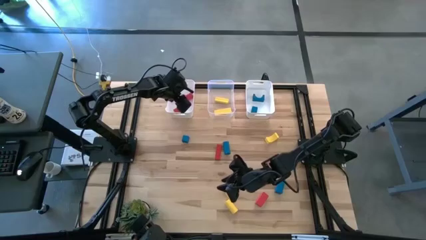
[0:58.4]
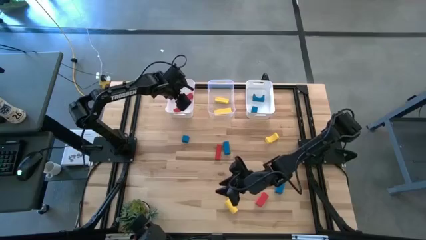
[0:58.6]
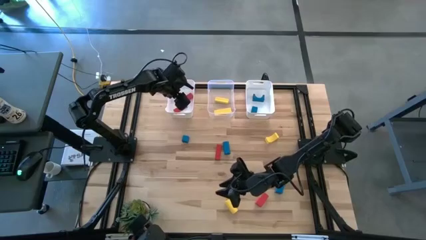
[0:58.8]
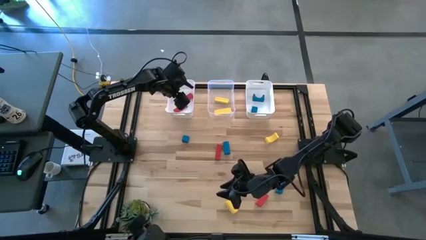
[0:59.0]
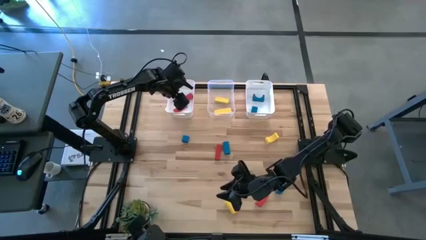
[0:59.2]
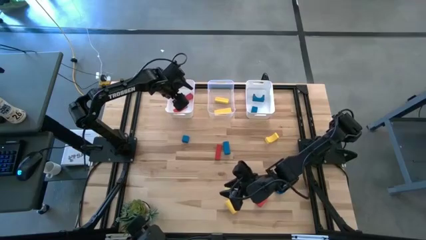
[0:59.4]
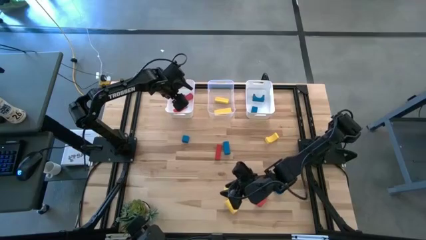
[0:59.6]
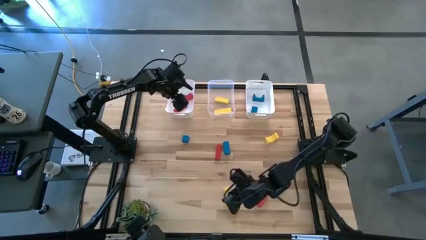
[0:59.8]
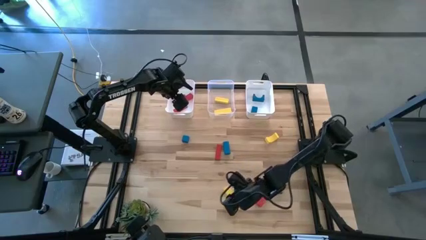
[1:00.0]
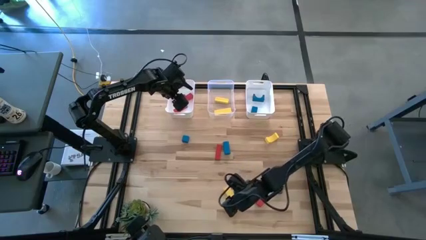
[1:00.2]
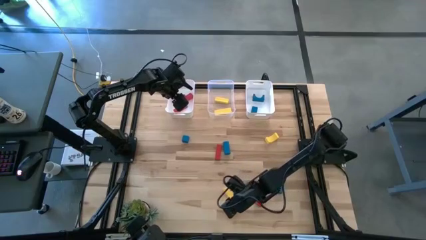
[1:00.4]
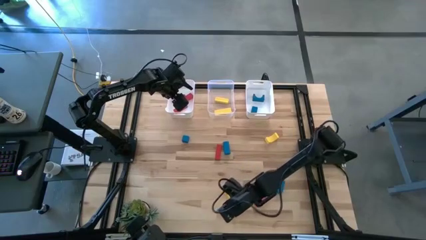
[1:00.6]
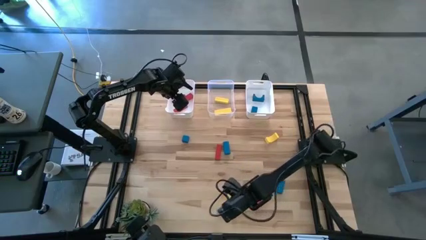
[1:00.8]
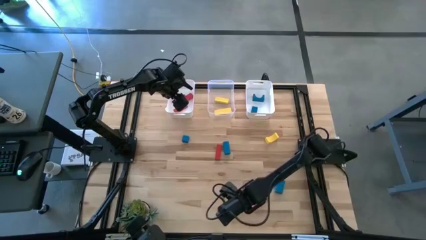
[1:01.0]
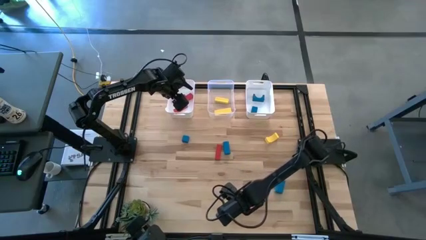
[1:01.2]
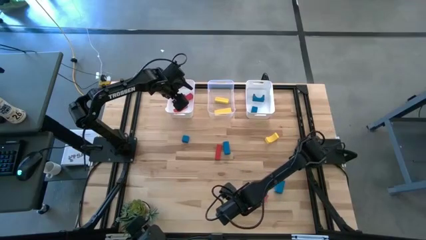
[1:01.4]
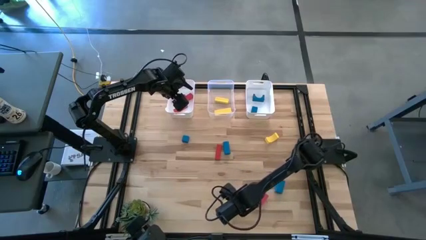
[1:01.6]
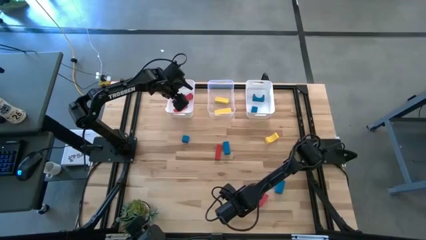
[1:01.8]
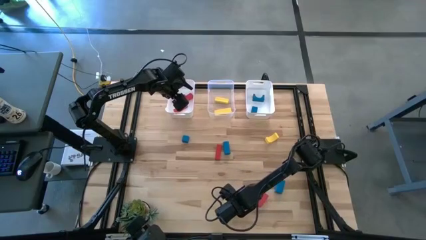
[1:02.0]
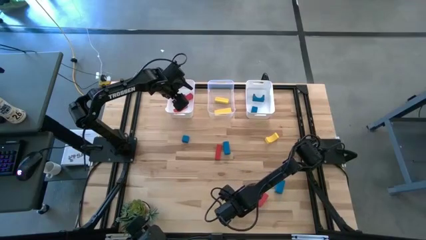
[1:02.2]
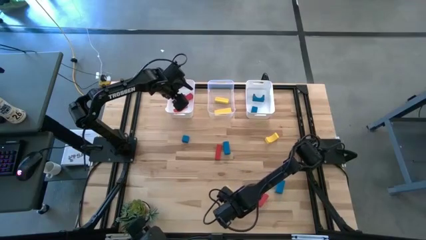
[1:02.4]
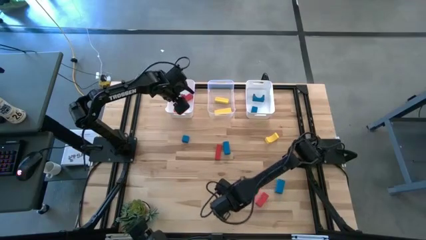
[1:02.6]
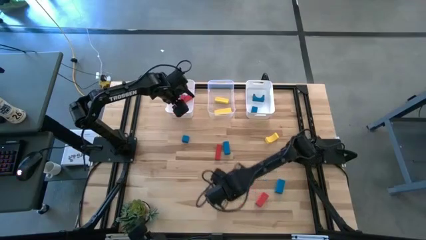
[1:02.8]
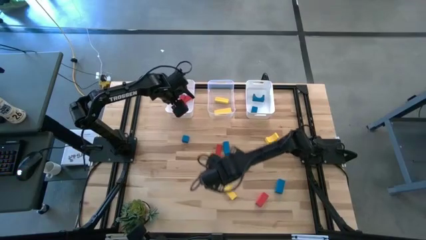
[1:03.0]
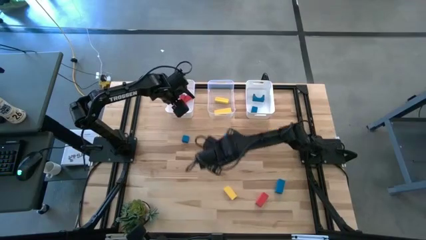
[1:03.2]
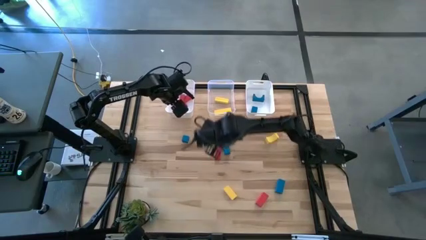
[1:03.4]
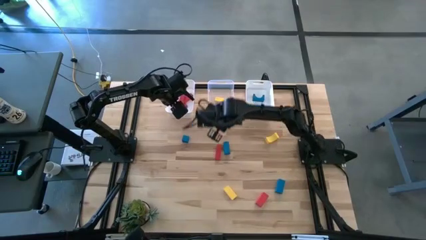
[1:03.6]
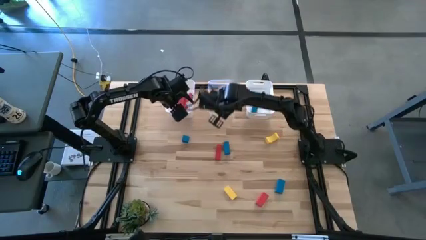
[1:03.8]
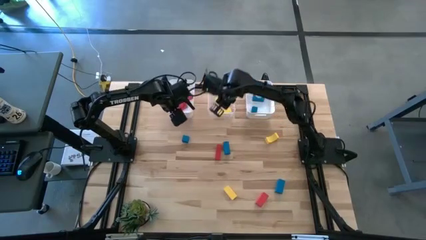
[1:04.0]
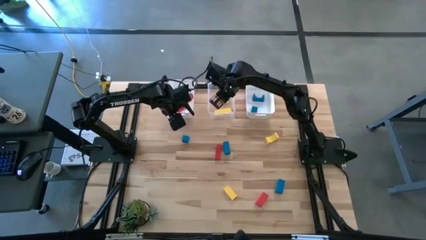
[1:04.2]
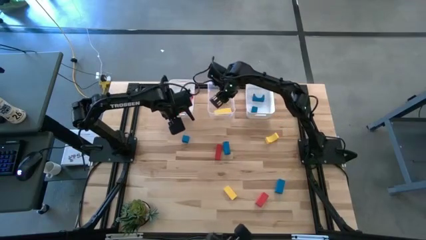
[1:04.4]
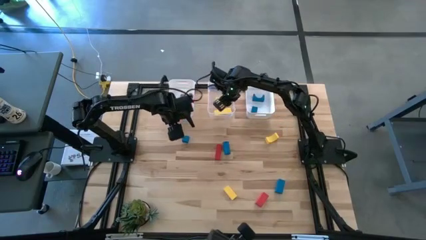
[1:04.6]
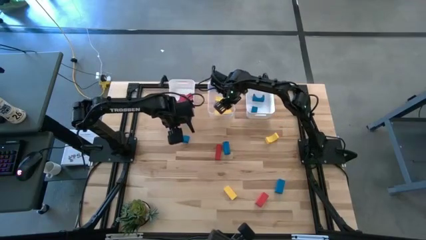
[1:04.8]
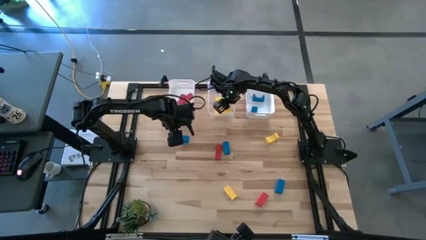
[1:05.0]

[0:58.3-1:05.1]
Task: Sort & place blocks by color
Put the yellow block into the transparent bin

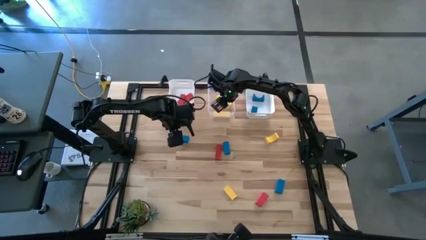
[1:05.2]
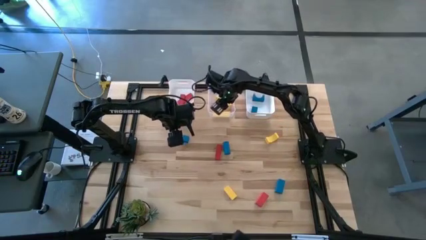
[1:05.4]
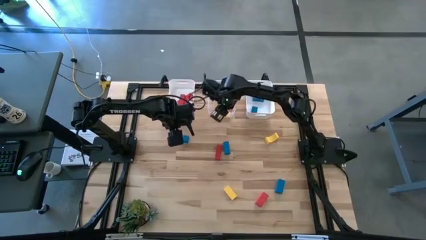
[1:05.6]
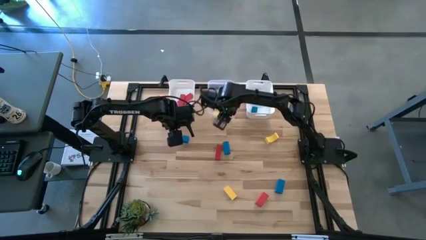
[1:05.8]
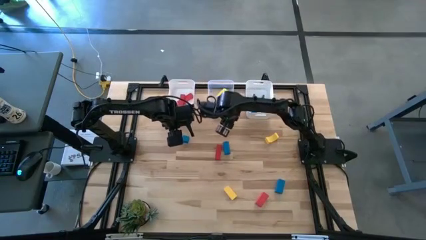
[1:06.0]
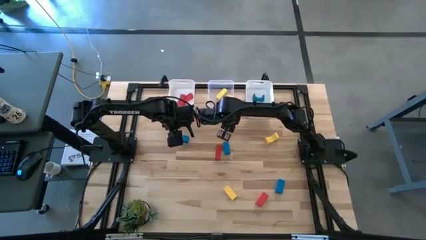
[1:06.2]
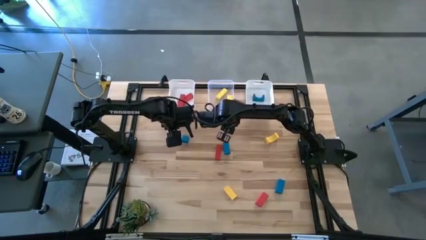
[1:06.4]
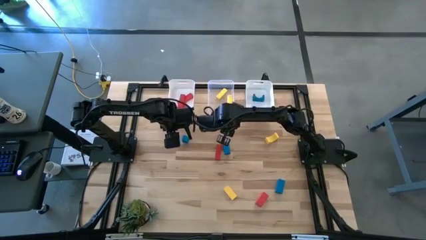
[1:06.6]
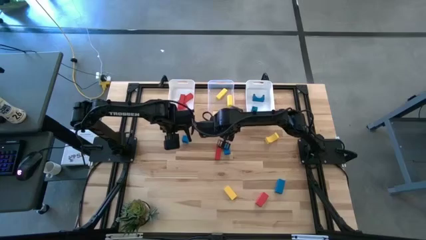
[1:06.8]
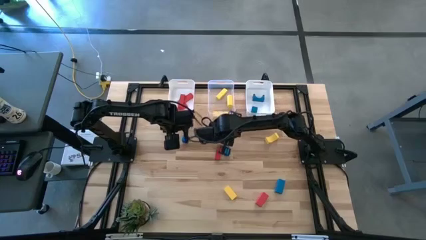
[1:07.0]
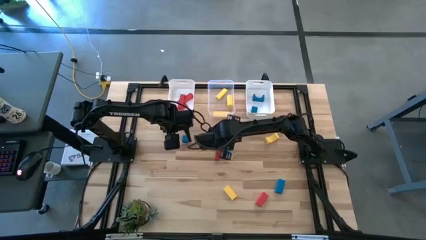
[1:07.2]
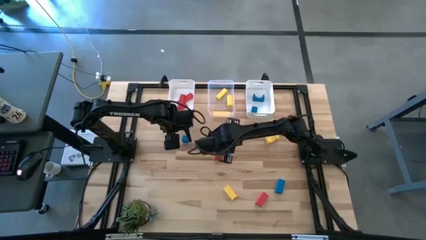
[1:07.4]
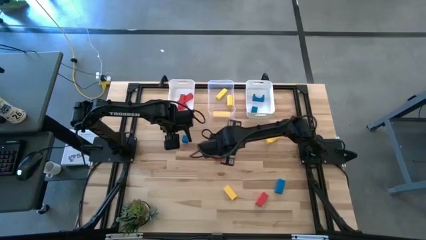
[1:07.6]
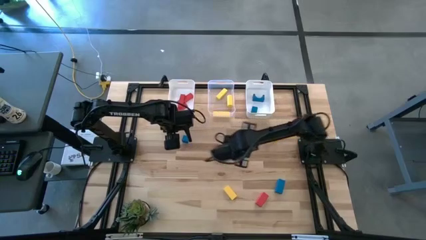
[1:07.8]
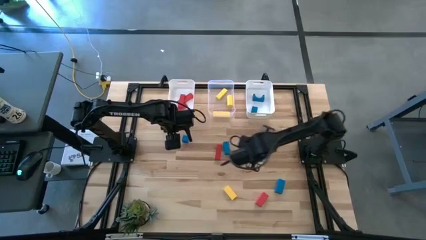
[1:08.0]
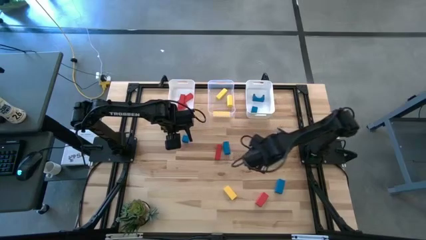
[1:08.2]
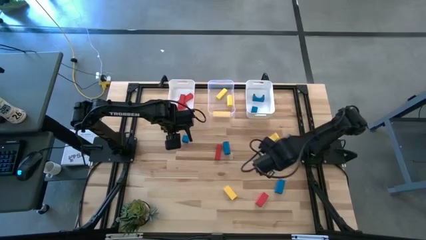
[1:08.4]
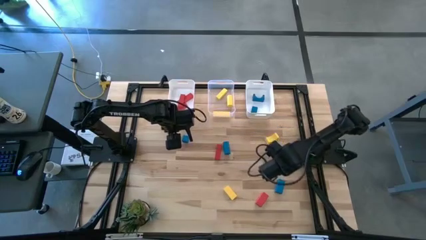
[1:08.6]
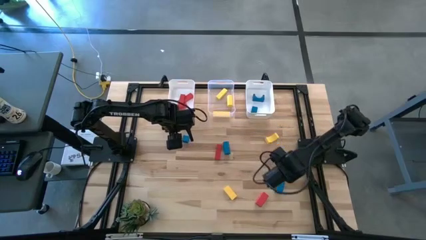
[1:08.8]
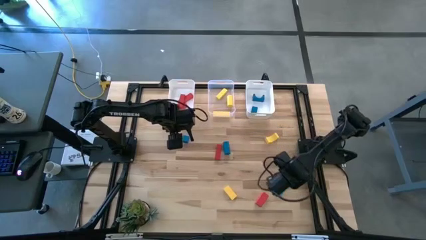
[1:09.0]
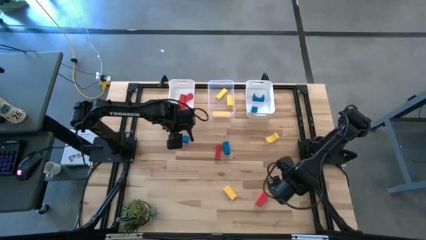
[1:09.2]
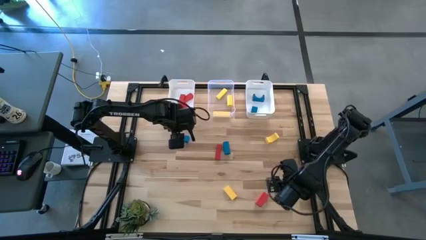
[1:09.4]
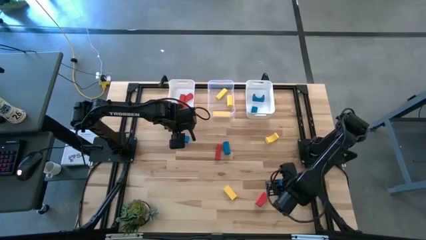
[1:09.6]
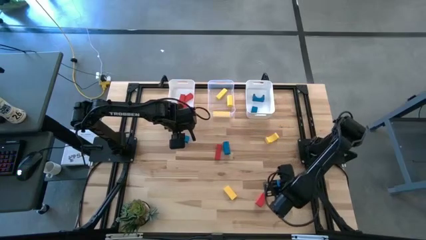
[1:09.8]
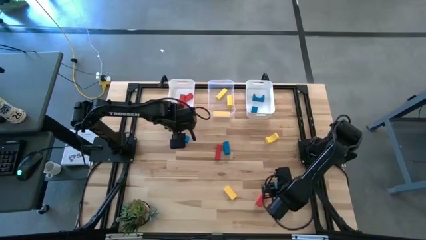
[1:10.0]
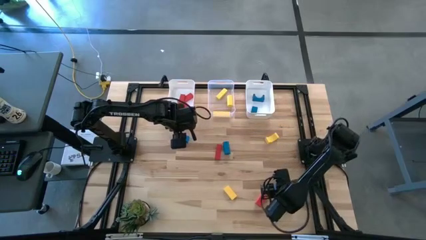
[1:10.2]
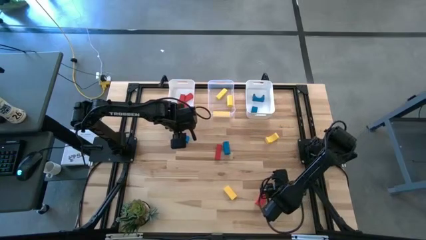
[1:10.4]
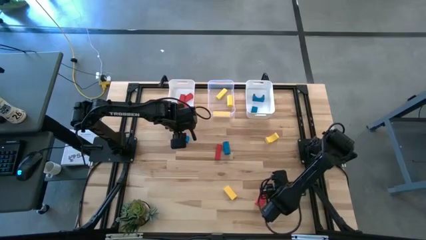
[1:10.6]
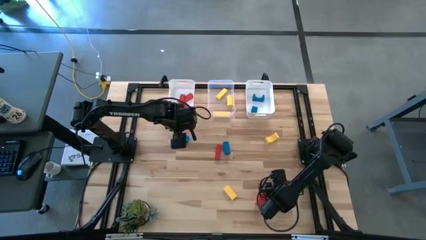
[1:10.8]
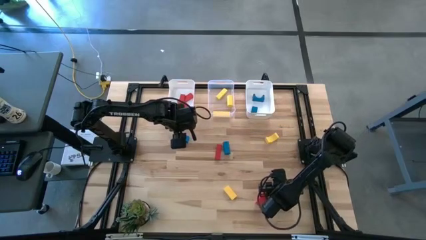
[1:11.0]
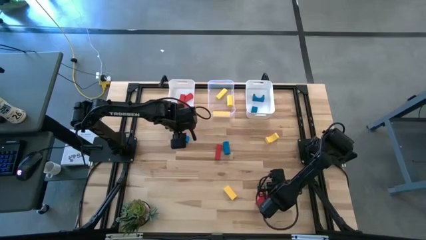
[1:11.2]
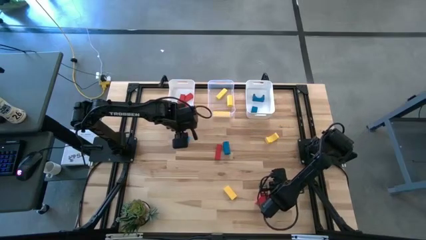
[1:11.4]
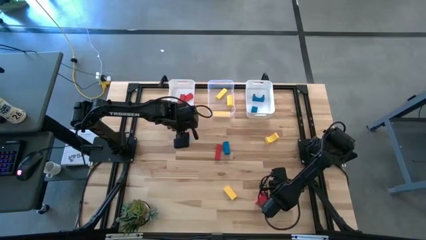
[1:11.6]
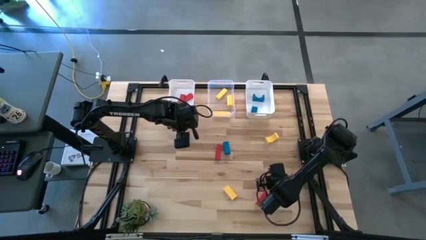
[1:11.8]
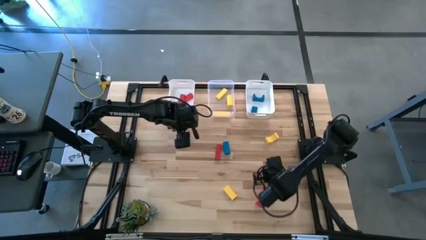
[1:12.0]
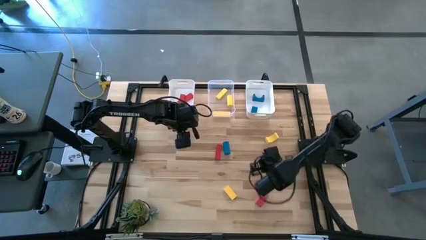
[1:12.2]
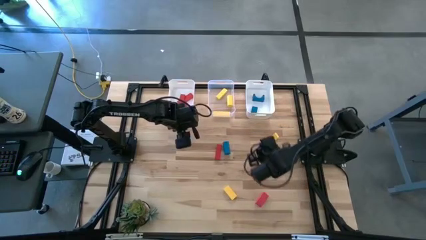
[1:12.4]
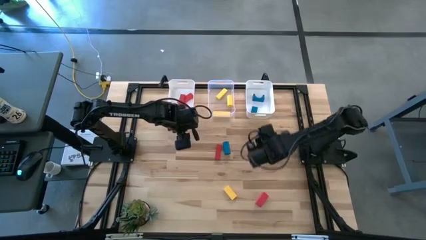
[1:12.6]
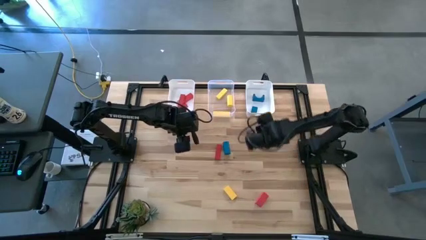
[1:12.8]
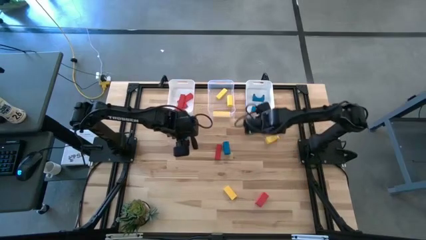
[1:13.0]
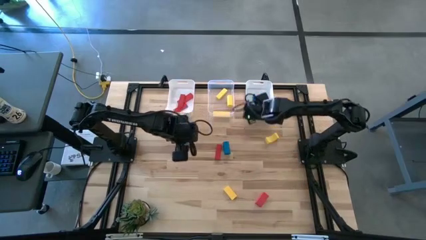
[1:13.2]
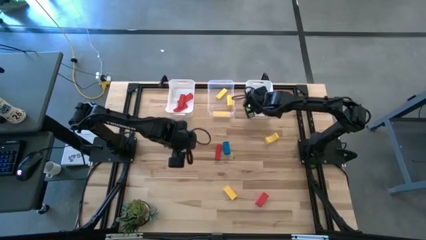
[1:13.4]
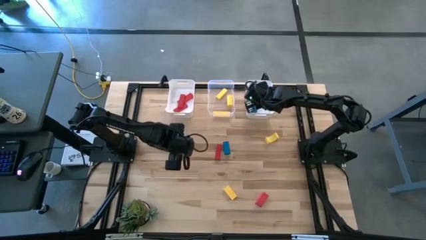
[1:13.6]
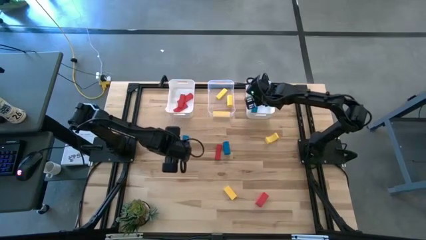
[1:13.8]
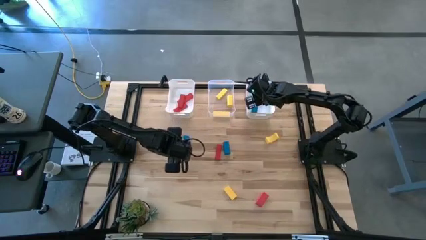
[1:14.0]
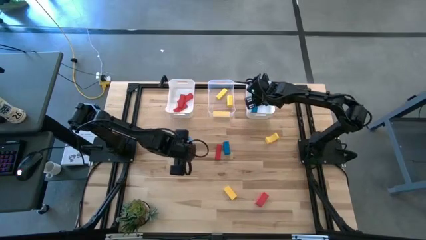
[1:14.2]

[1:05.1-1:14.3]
Put the blue block into the right white bin
